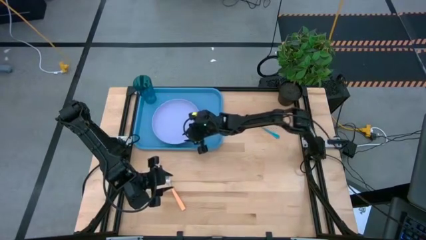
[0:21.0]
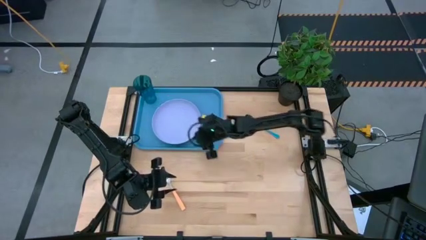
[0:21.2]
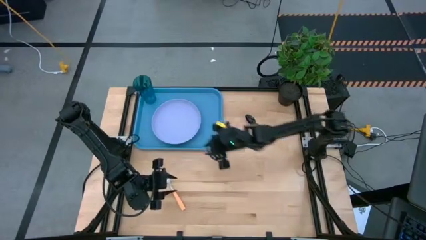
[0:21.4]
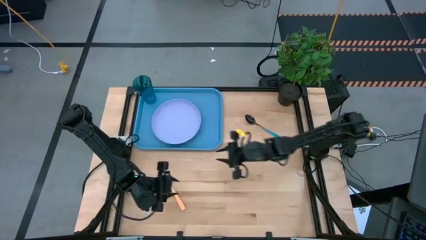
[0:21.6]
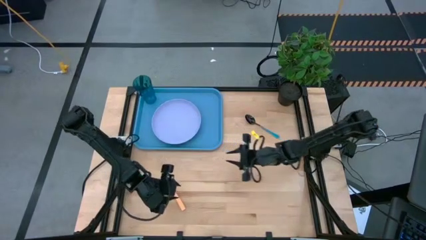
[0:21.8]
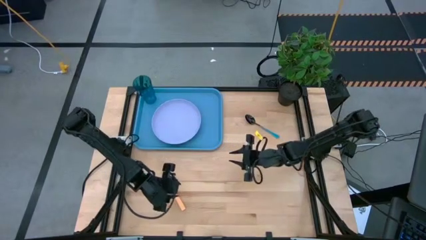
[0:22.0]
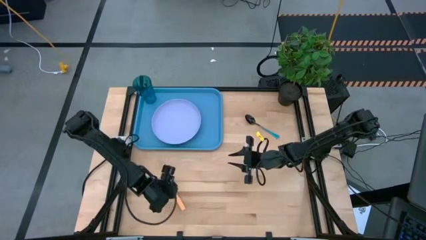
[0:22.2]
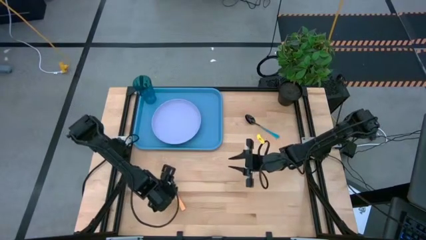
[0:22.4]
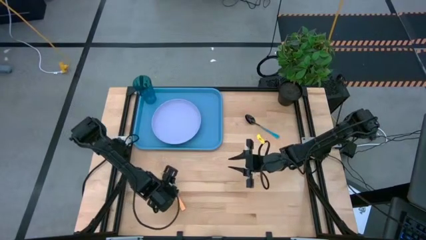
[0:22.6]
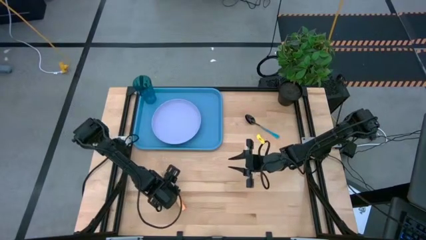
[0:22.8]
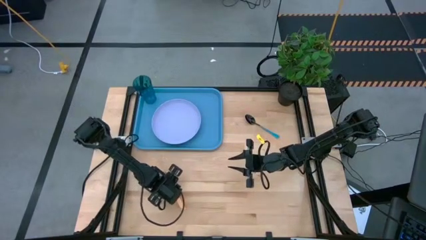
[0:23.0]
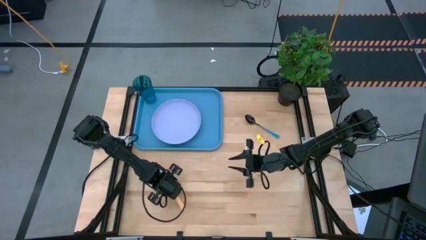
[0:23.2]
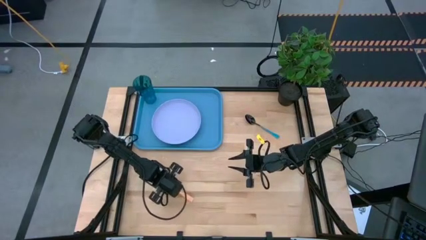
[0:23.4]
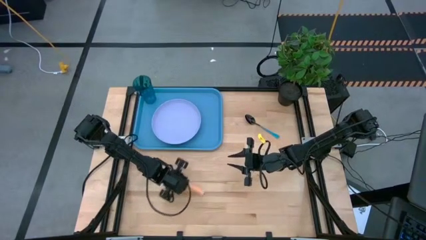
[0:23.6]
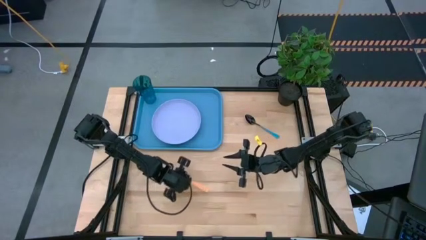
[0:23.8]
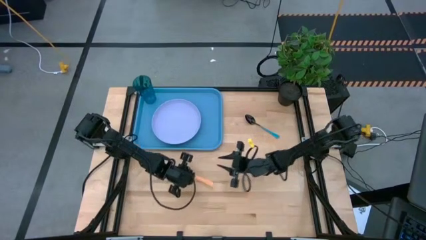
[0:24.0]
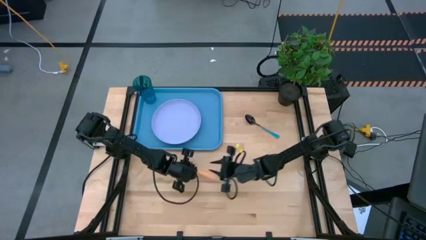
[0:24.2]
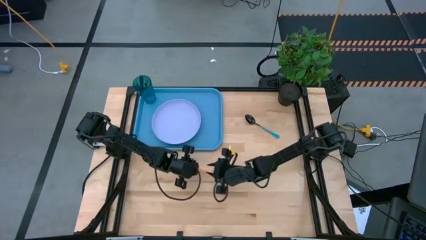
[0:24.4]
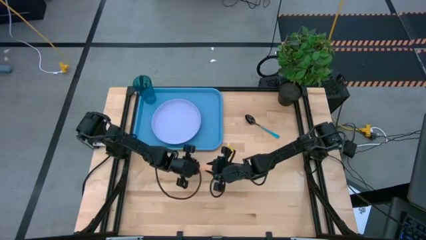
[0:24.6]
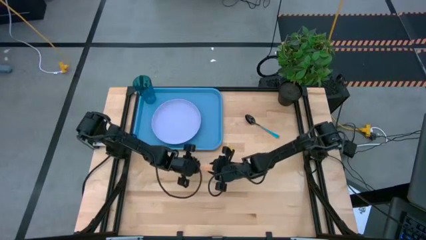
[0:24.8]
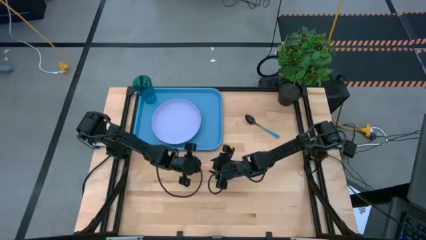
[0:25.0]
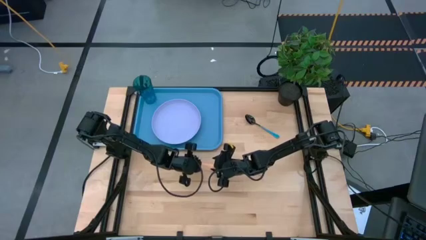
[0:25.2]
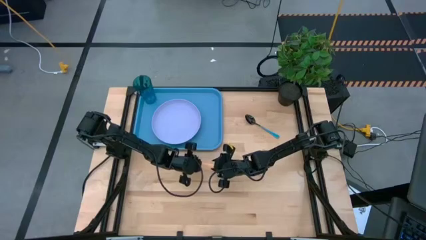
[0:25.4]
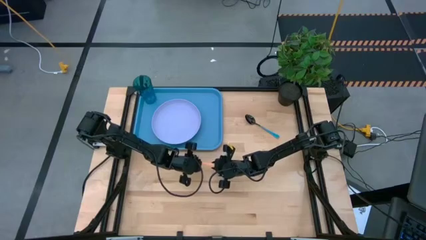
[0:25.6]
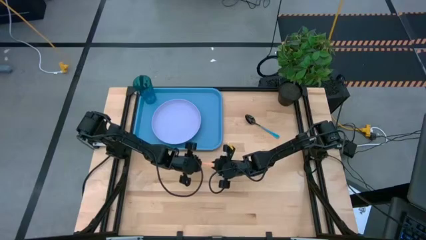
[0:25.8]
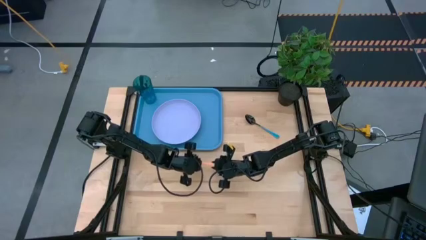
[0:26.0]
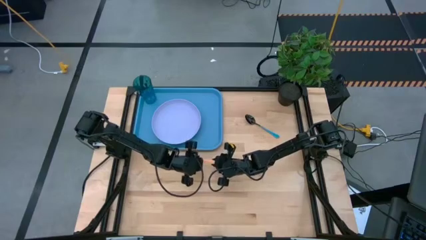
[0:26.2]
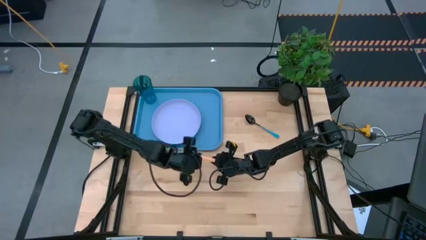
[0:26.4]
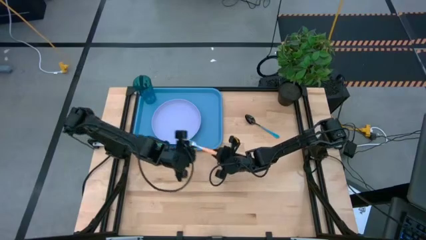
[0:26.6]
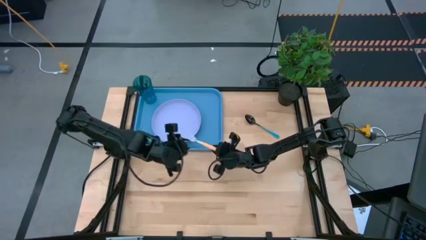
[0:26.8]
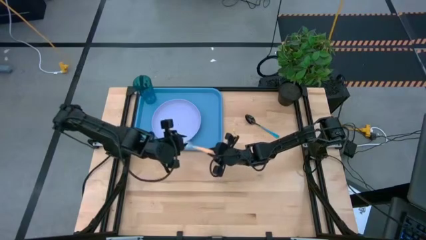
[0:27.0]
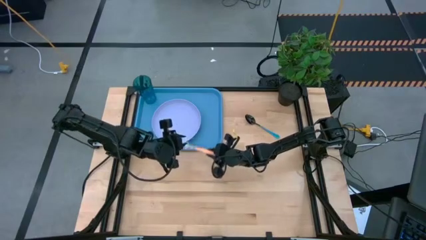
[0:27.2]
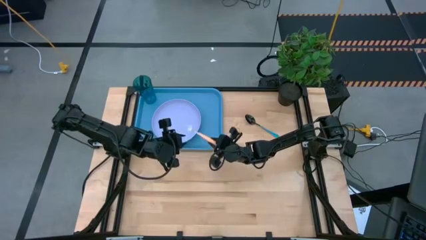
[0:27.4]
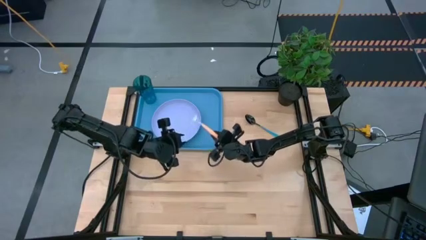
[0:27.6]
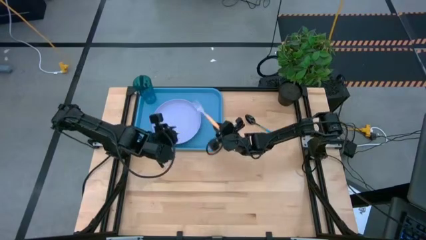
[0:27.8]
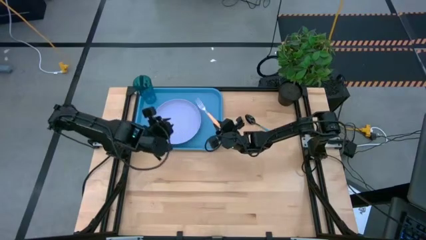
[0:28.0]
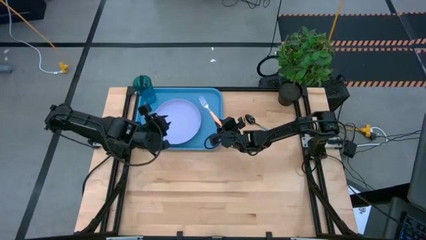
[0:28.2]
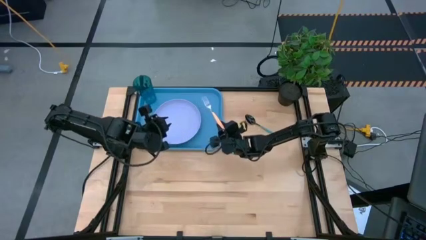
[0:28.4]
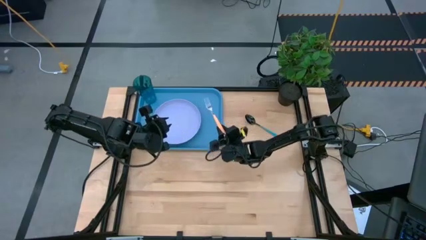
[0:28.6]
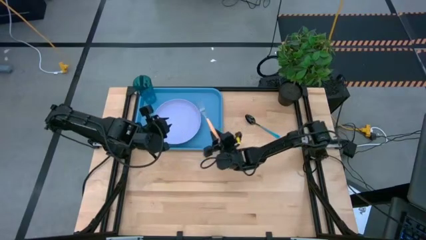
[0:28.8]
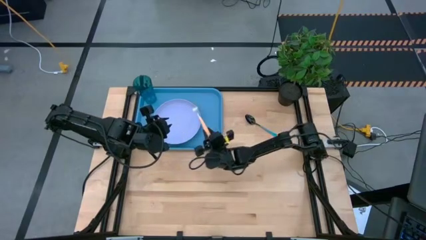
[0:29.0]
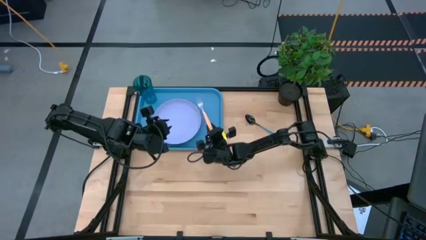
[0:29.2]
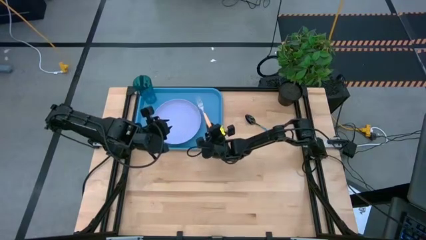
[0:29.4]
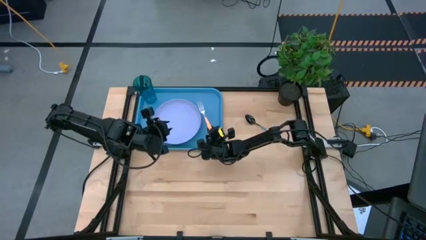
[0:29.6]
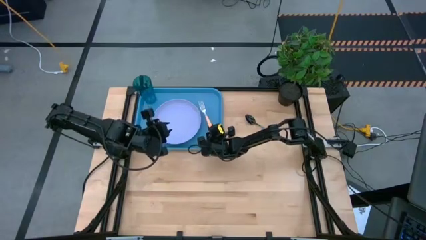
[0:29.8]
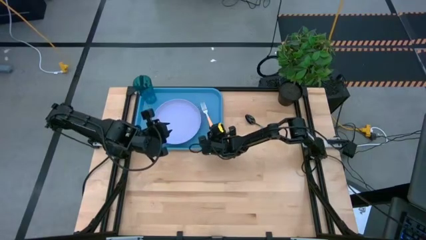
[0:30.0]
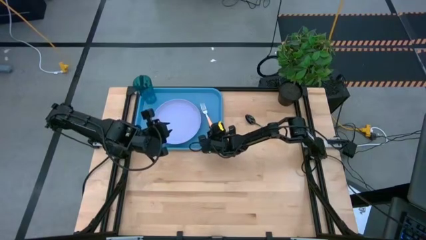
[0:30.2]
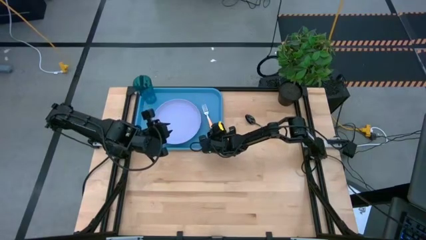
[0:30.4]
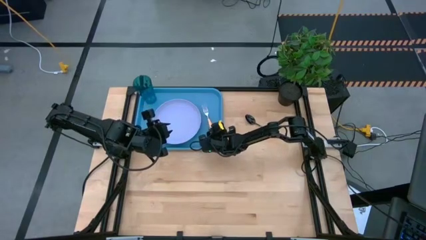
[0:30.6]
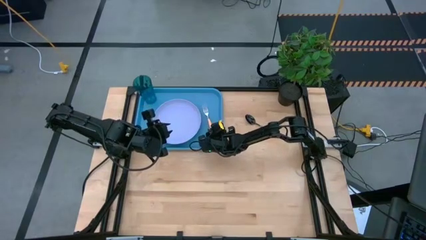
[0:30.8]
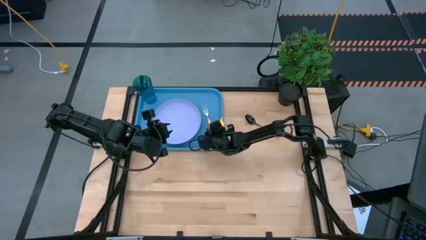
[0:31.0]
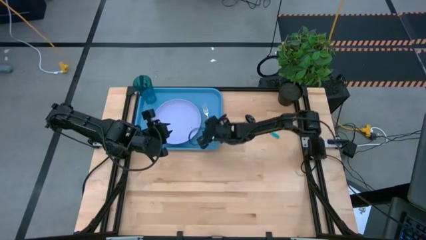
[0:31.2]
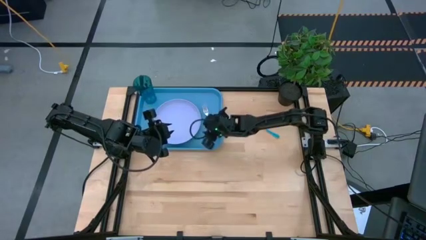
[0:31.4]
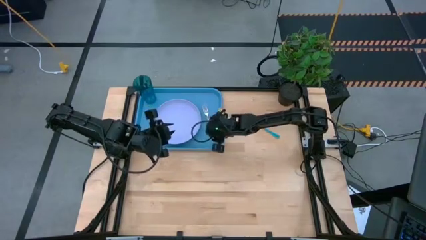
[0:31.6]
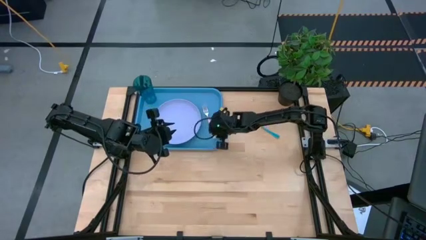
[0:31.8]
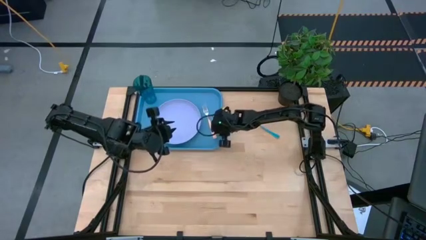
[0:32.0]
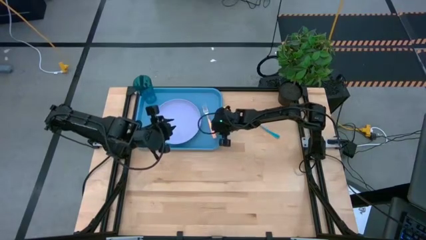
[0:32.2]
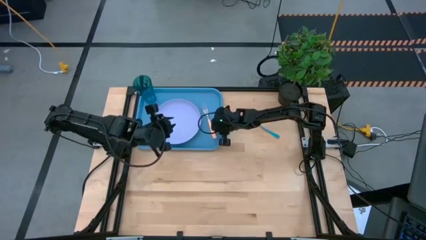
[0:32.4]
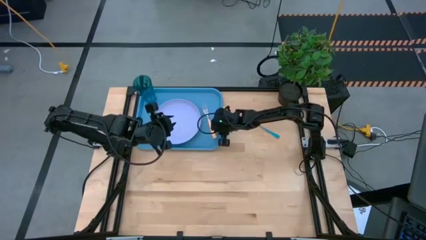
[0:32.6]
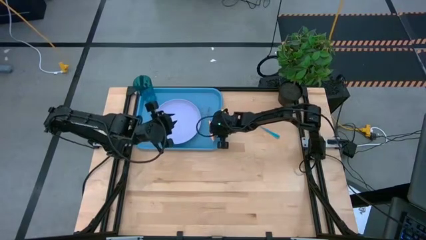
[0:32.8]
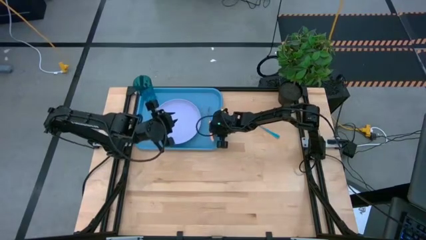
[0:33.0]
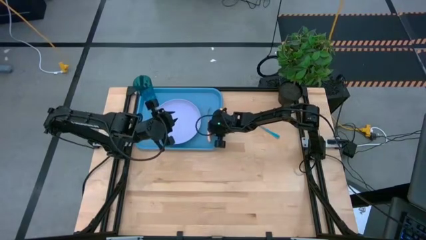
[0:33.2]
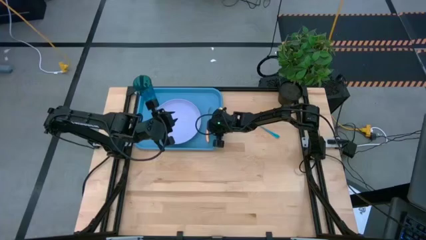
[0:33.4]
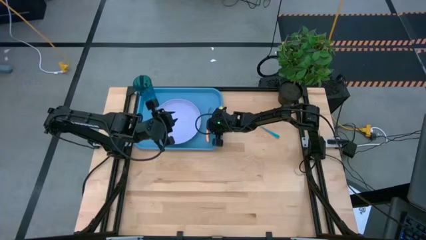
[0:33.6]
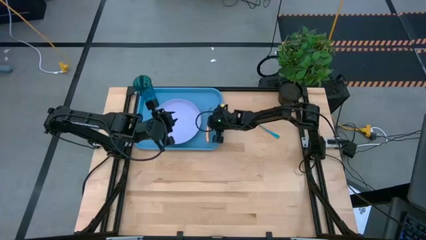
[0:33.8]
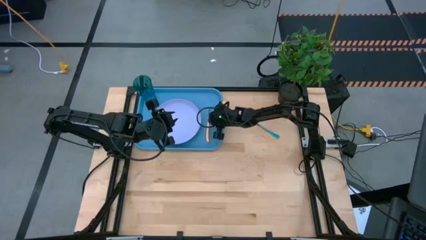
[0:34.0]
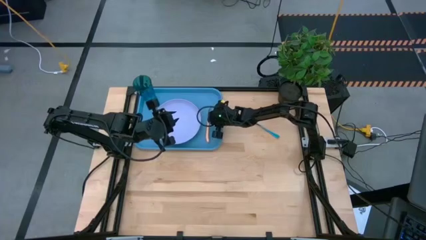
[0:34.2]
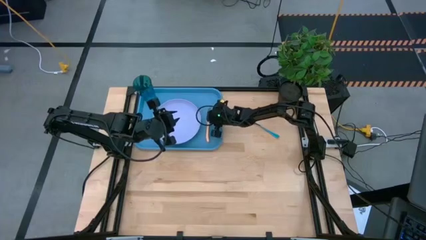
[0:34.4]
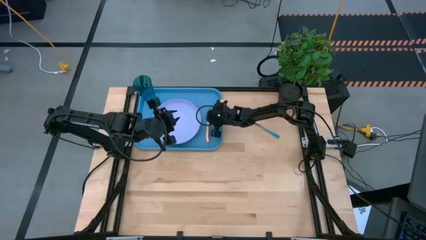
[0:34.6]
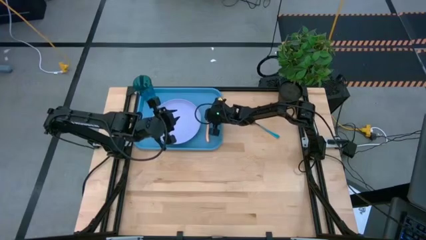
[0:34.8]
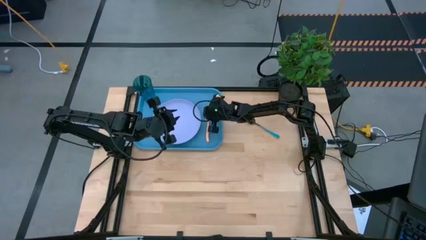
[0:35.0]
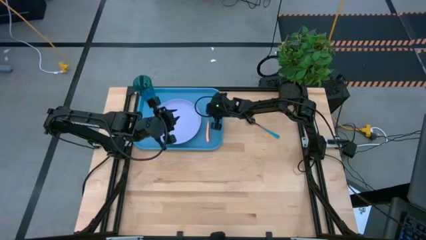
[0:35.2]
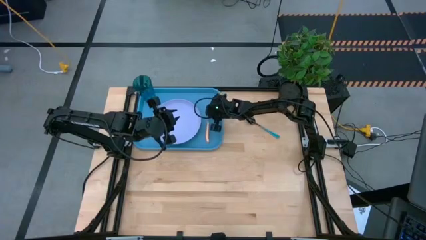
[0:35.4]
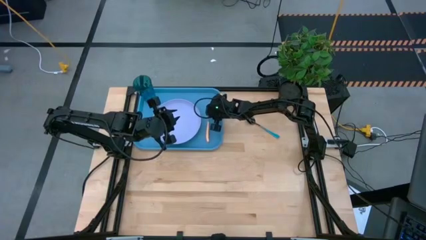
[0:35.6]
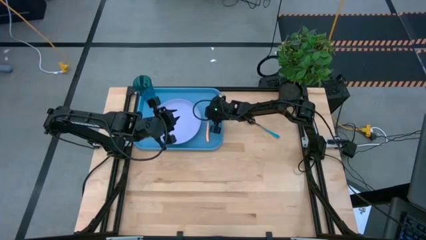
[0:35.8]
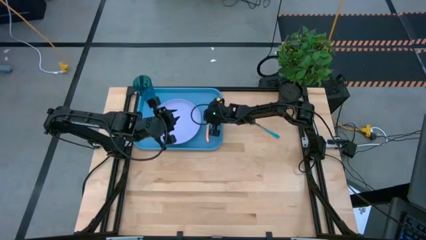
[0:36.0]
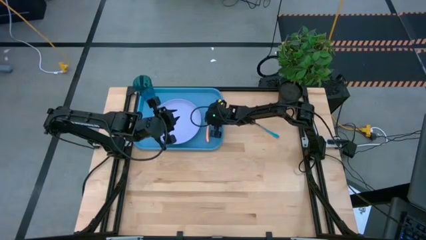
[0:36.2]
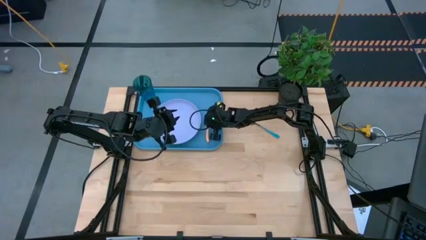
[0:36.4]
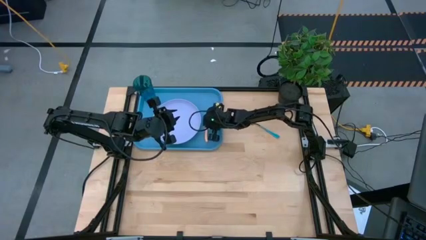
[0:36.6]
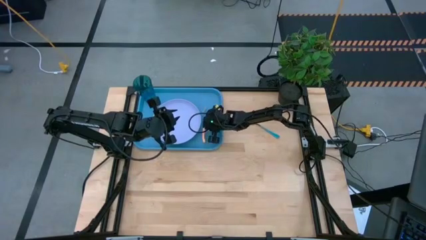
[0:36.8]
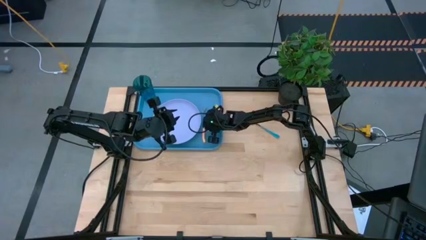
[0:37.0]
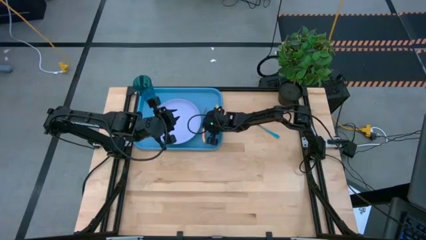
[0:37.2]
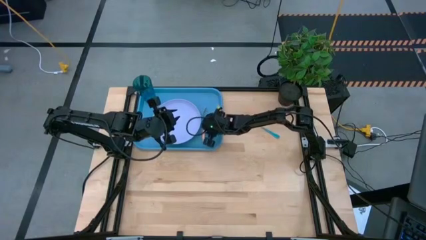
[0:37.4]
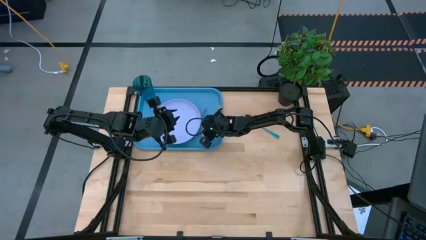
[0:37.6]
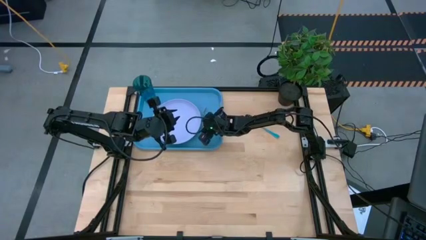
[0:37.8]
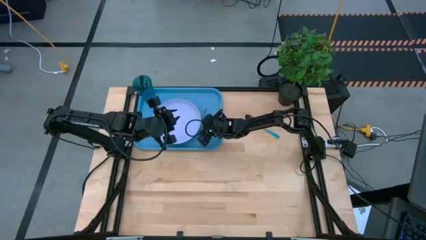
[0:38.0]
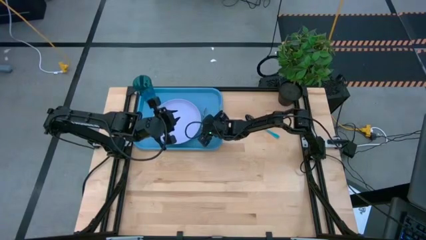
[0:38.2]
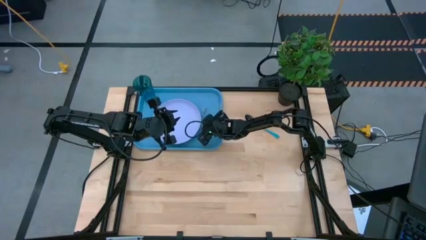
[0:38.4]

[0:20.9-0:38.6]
Task: Pick and place plate/cup/fork/spoon on tray
Put the orange fork on the blue tray to the right of the violet plate
